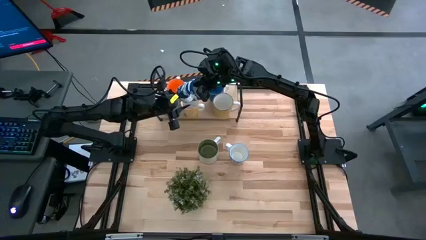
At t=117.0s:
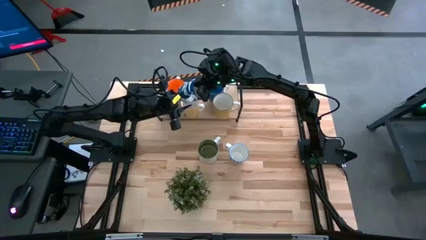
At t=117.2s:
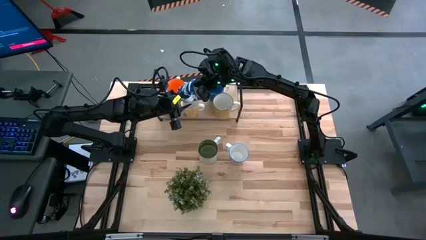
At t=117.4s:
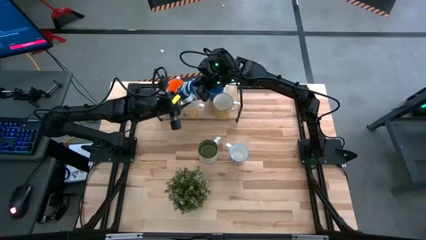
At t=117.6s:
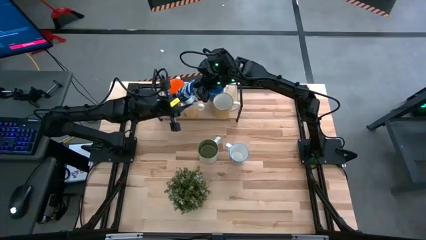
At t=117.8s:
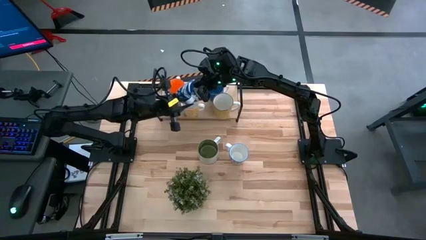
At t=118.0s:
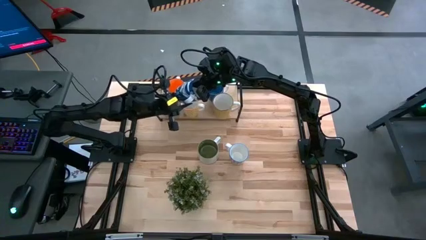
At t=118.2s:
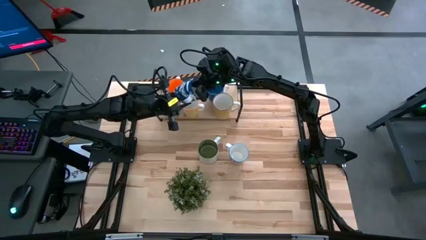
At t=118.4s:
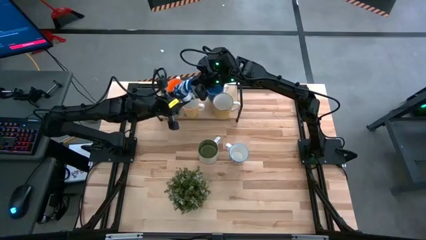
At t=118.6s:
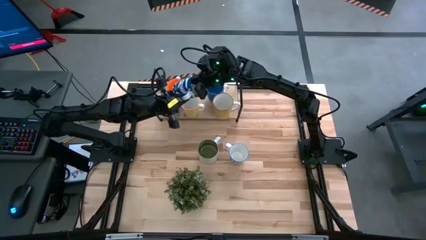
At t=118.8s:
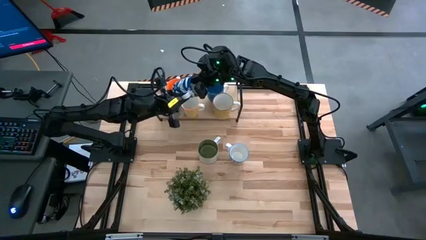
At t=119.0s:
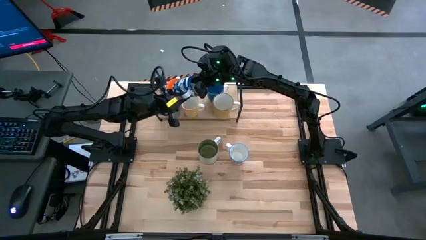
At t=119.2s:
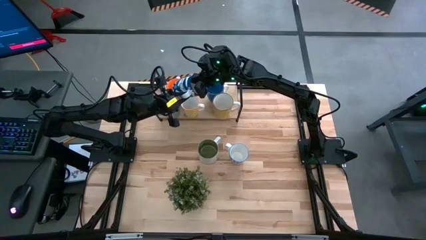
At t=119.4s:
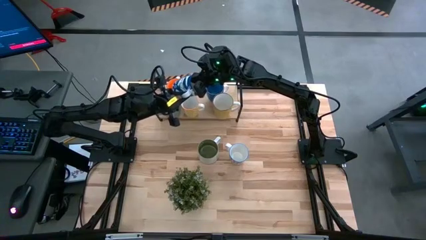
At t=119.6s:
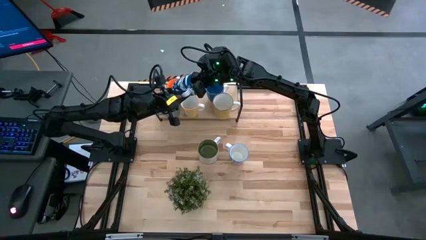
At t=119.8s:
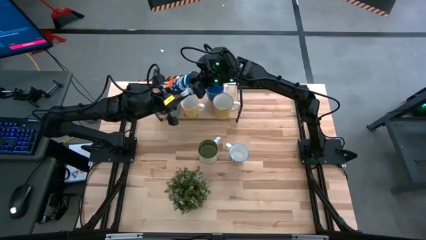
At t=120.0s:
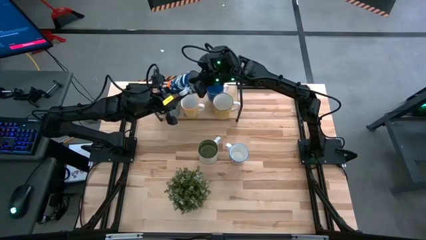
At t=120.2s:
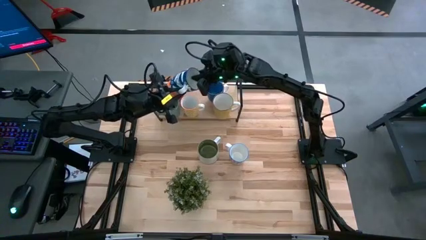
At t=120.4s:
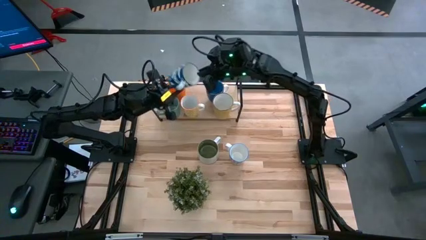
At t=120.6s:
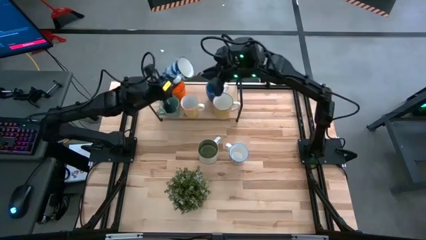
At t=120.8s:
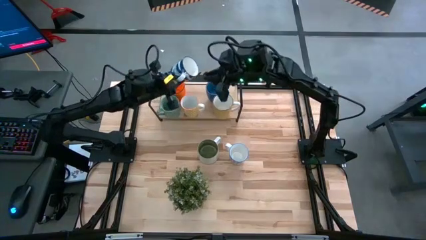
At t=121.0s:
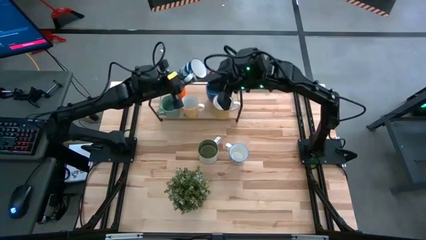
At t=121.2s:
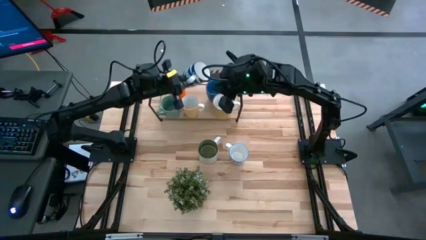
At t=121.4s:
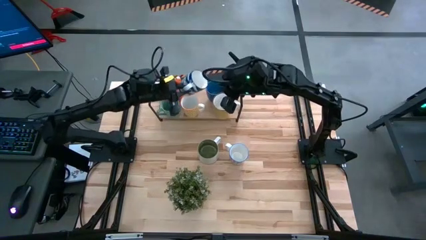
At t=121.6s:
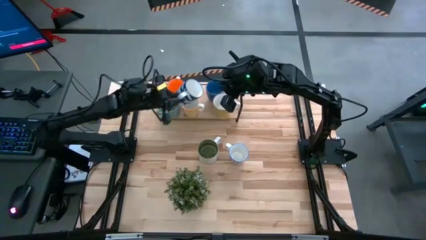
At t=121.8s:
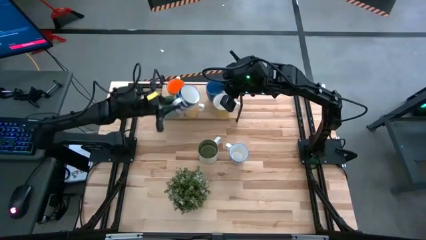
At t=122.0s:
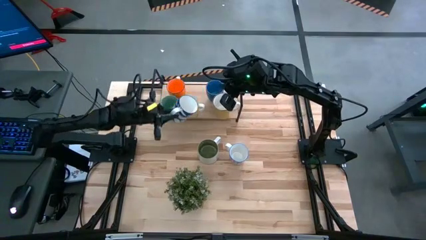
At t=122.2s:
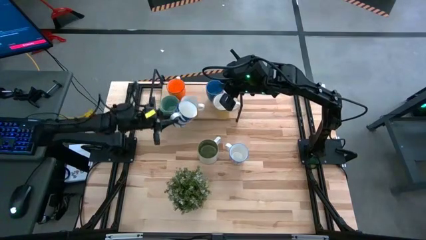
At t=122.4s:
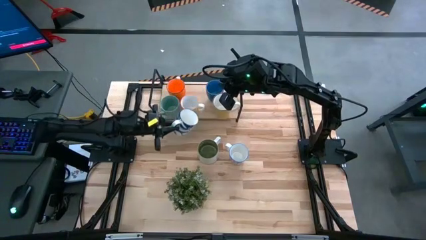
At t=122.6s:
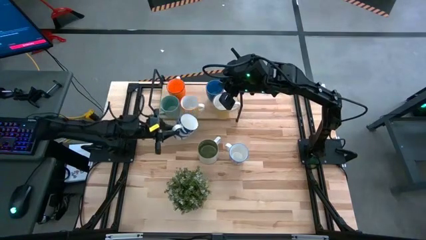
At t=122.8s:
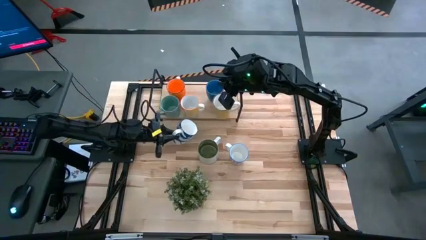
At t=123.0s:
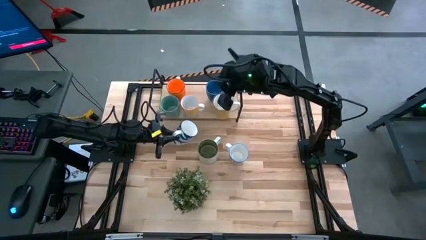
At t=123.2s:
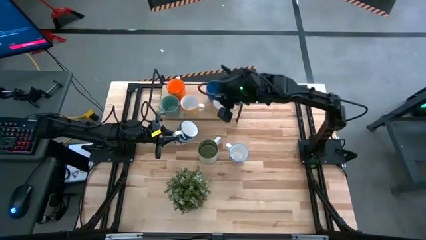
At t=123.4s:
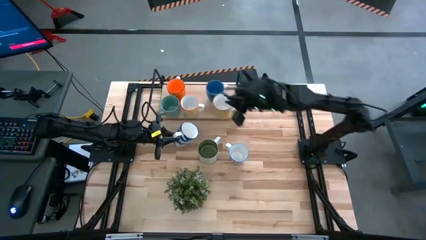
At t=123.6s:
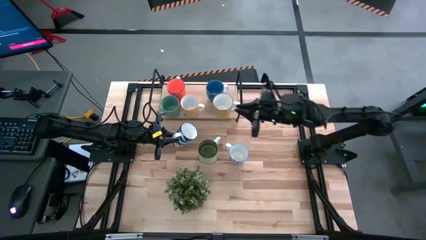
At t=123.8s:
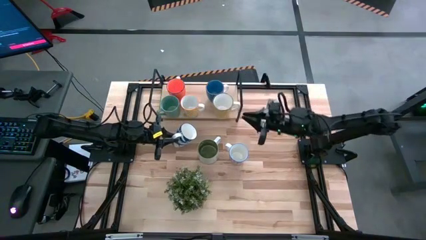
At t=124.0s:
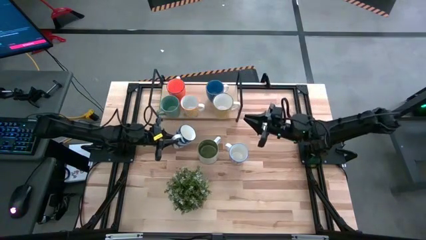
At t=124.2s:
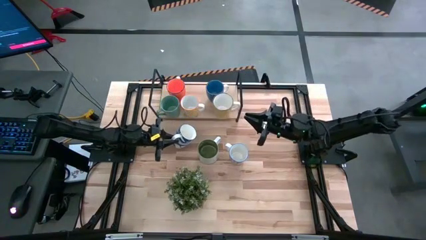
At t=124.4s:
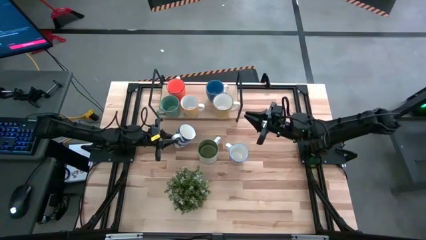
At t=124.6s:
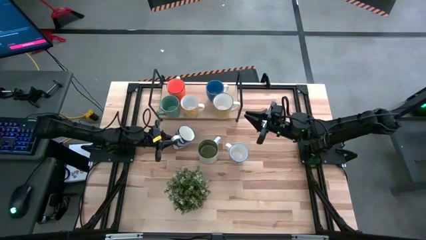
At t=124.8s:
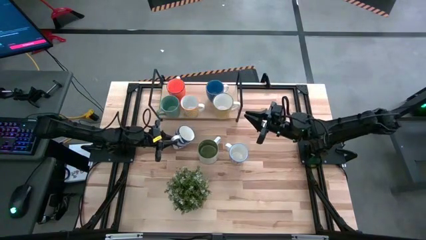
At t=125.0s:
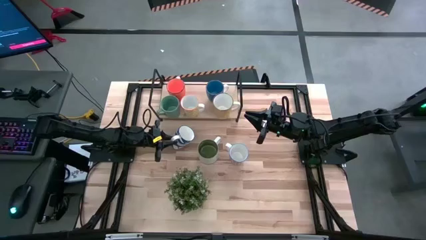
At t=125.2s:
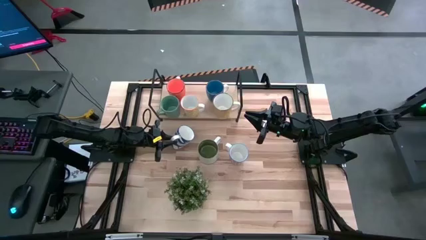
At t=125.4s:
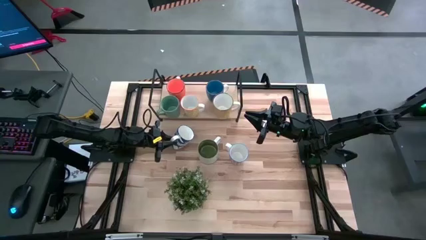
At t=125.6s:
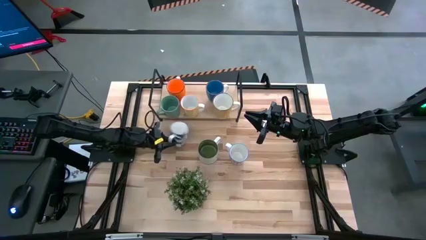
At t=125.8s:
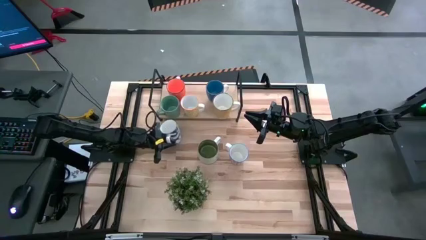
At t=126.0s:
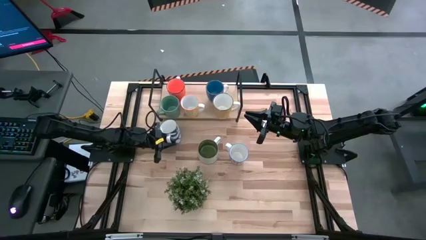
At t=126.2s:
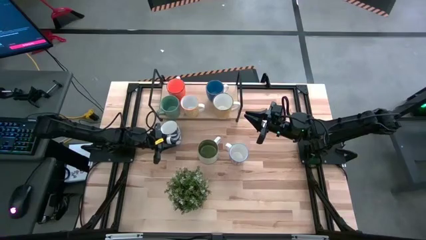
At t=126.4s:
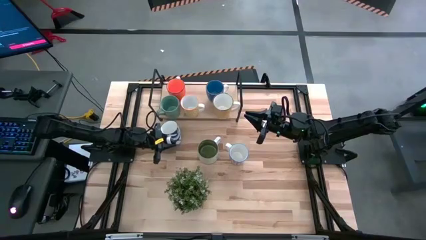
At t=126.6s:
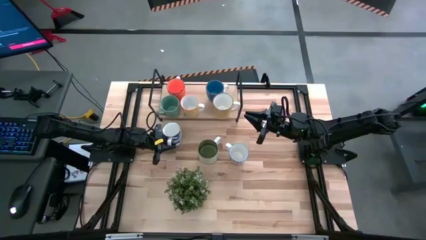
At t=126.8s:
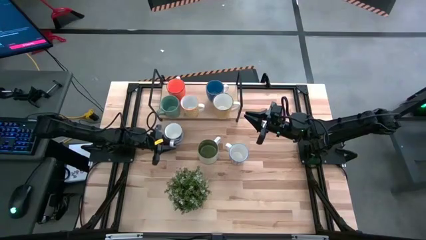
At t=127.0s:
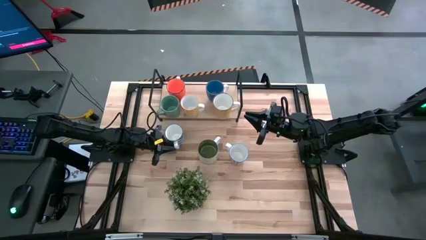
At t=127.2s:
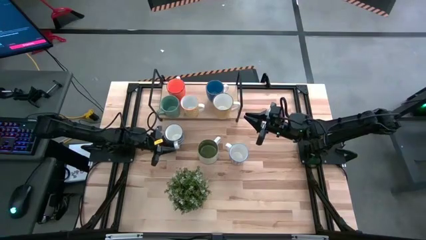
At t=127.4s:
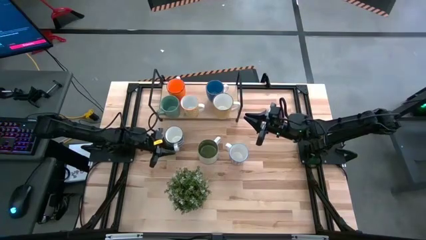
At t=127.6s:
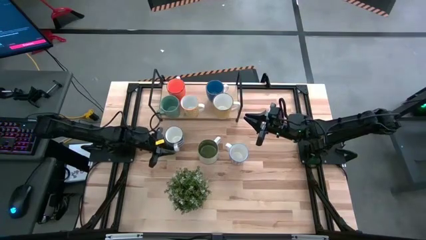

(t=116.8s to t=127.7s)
Task: Place coffee mugs
Move the blue patterned mug to the middle left of the table
